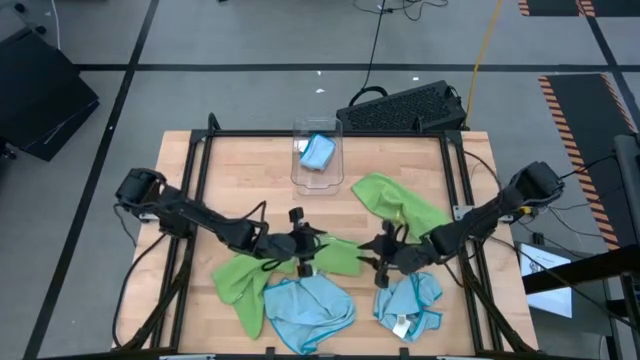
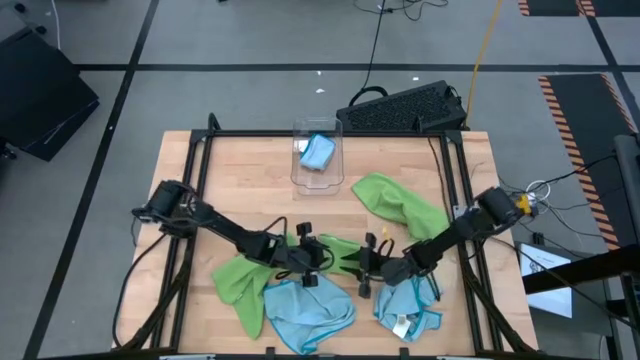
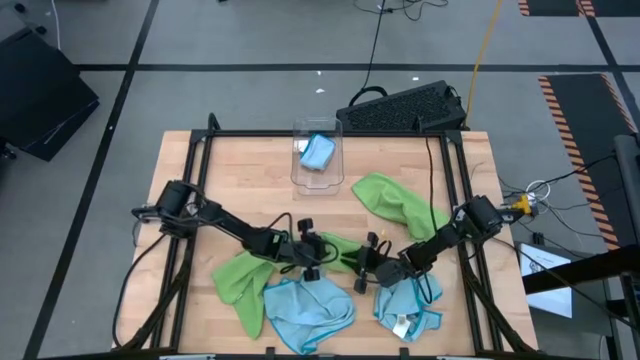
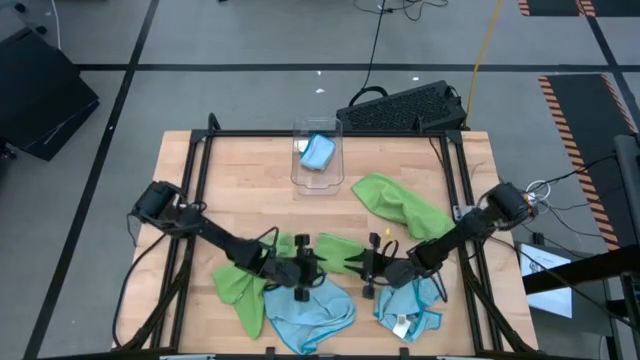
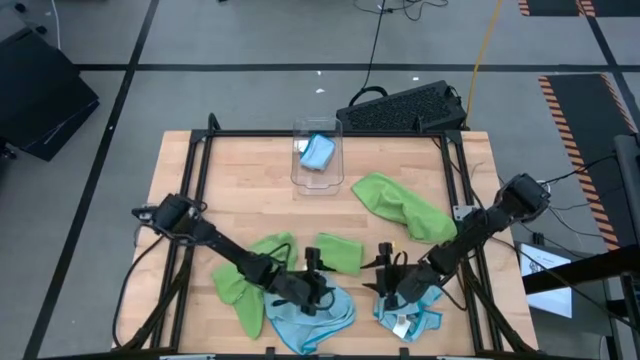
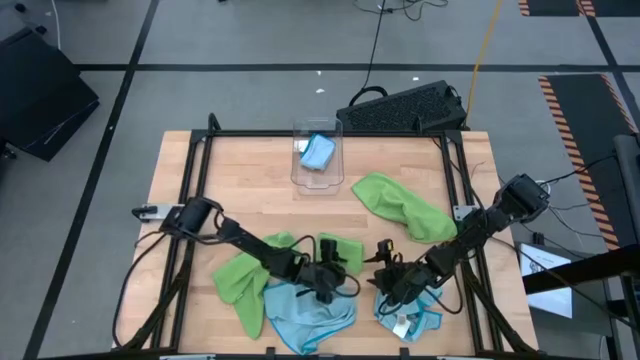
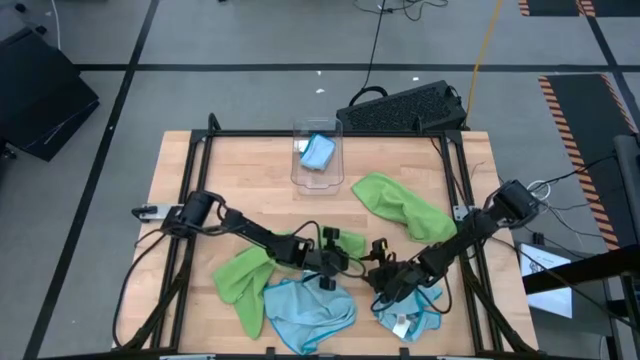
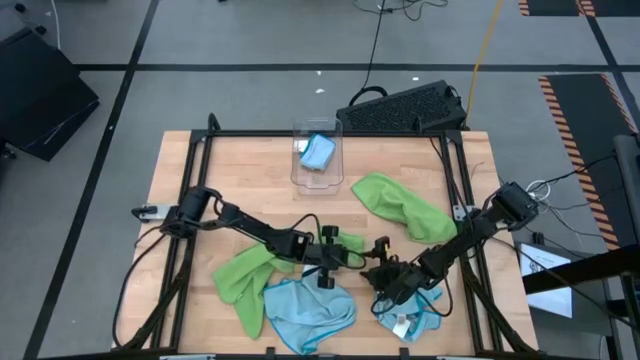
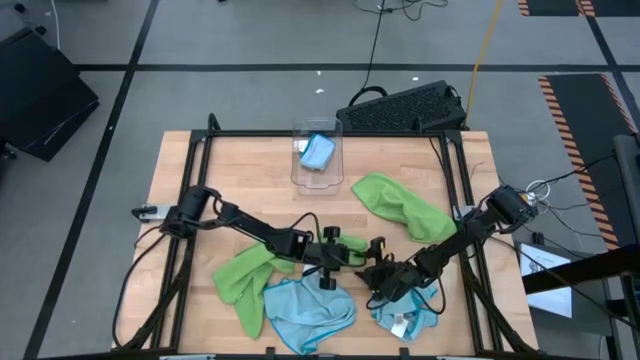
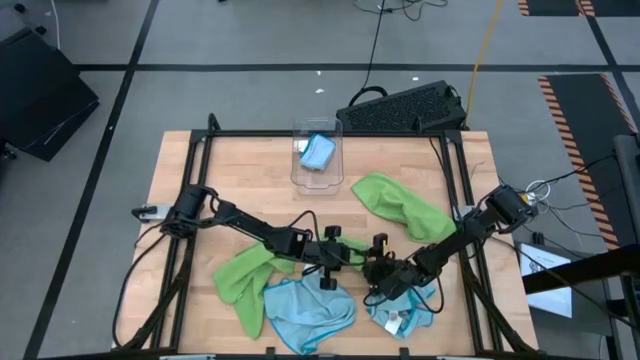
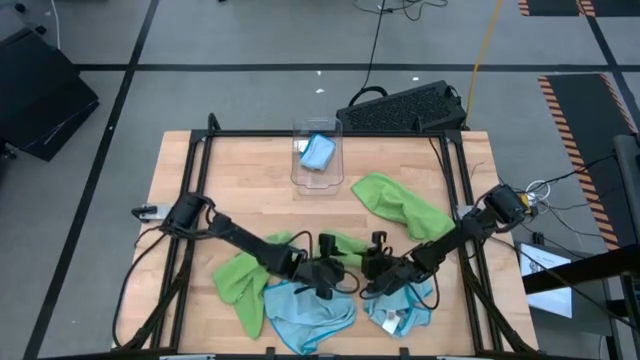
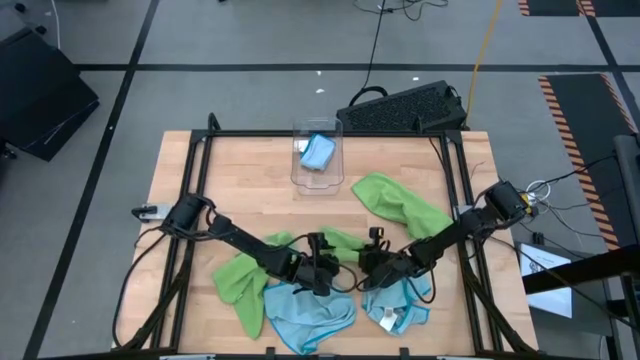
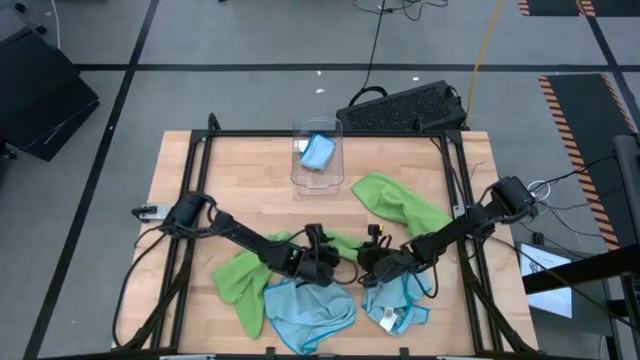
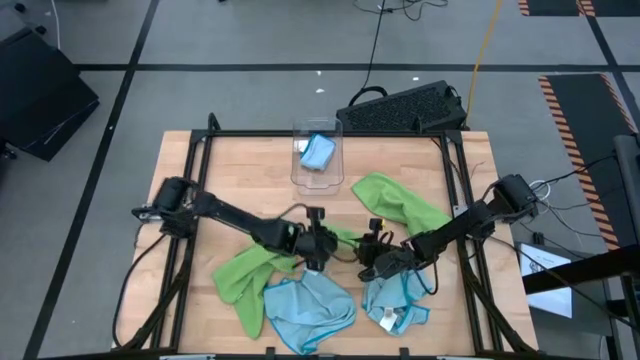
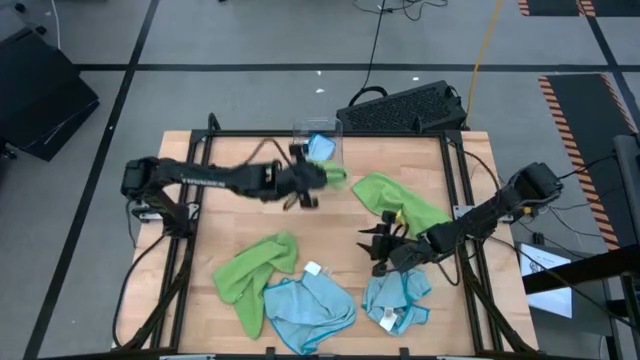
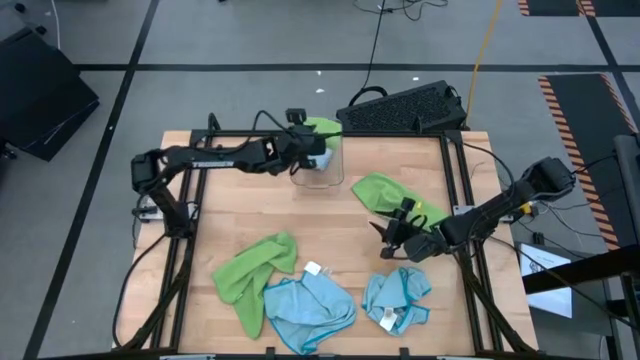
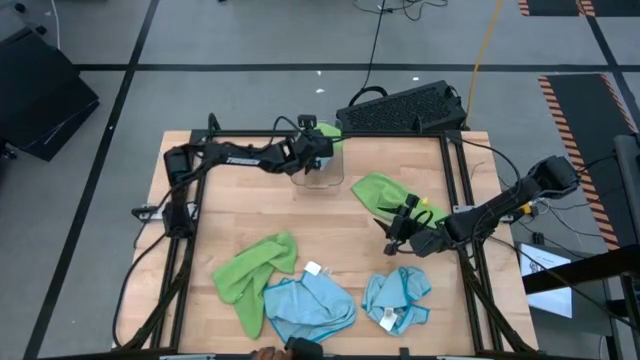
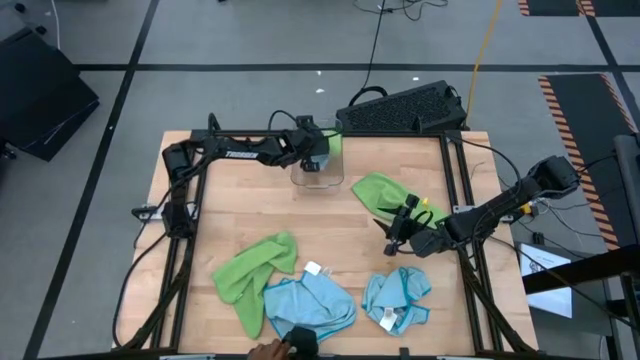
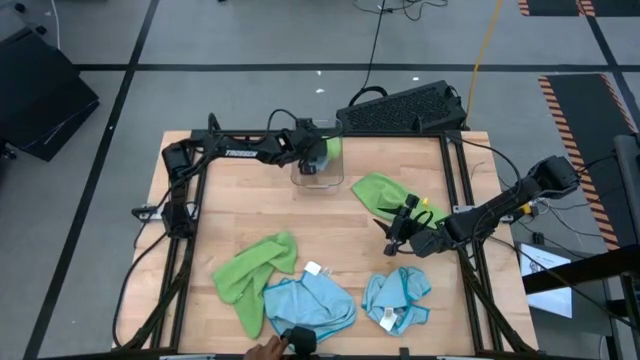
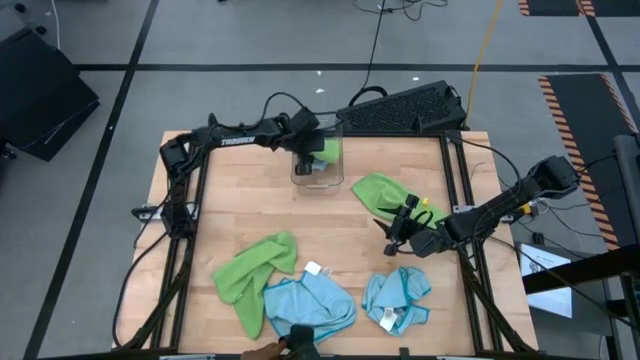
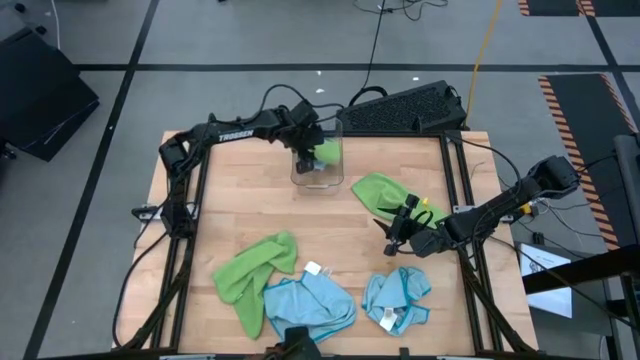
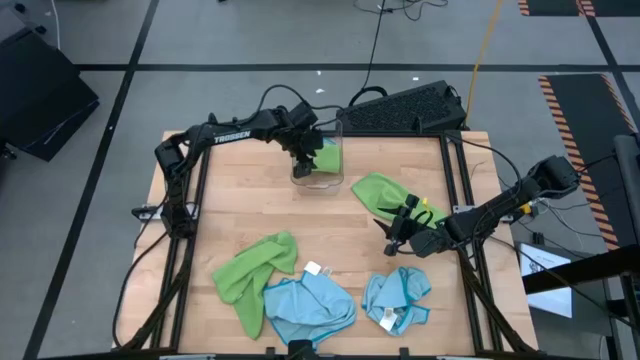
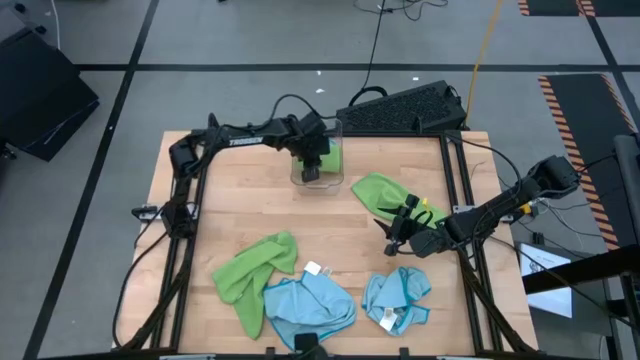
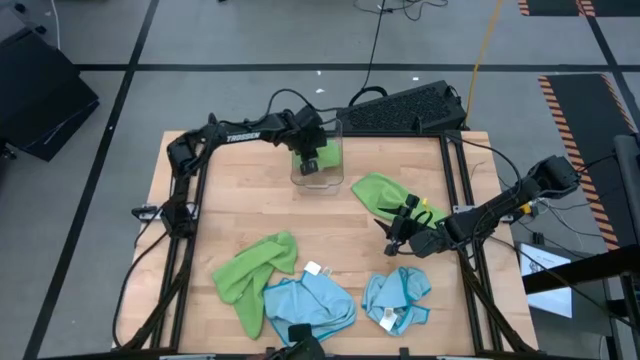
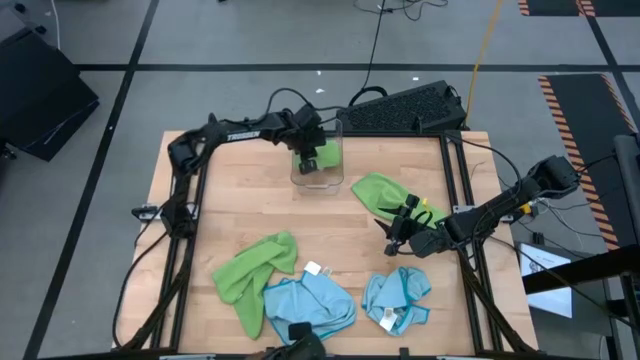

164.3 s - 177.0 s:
Task: Fold microfiber towels
Put the center green towel into the transparent bin

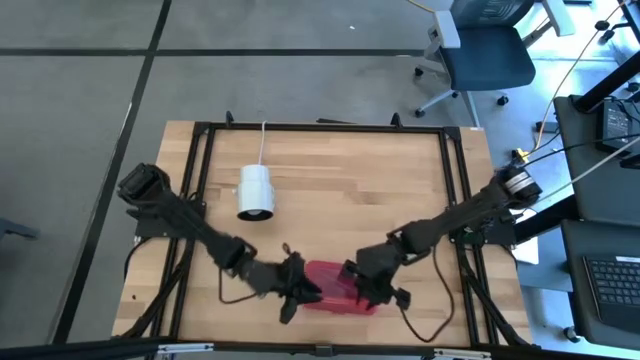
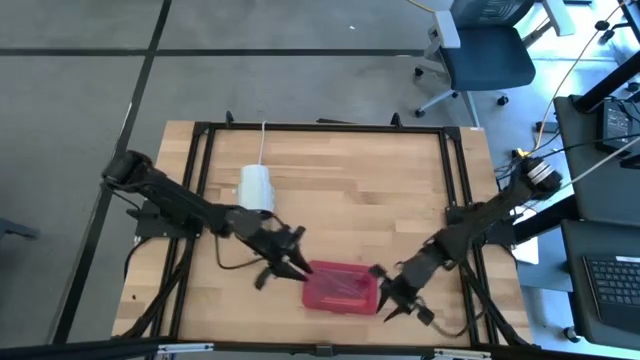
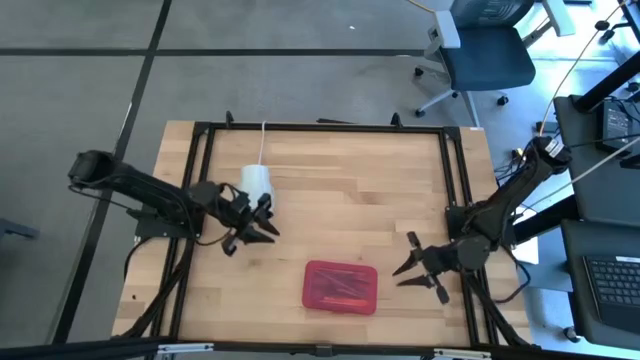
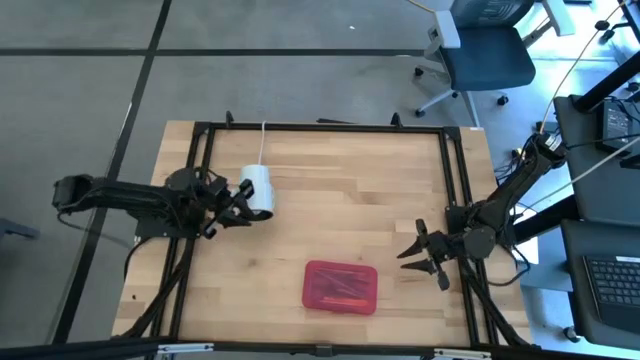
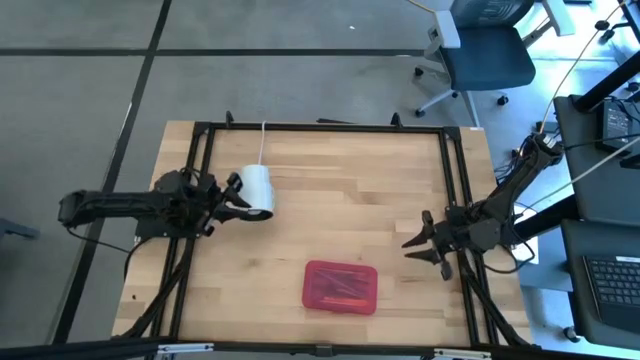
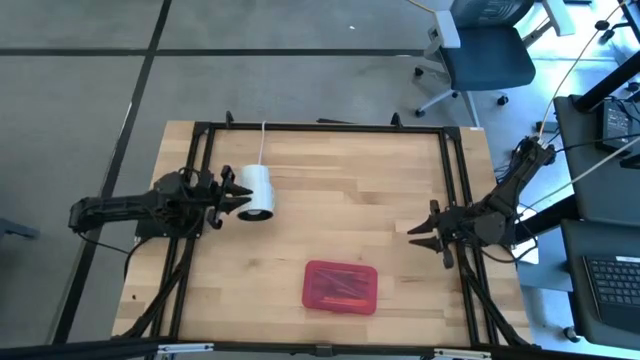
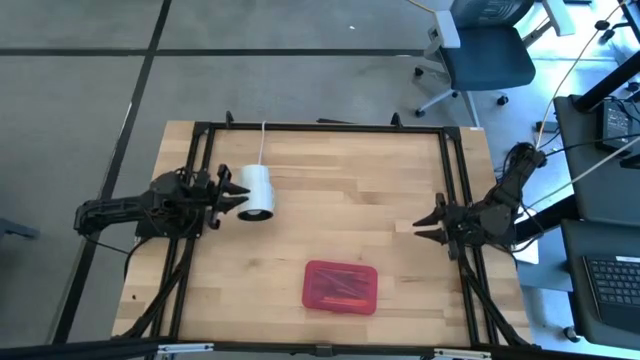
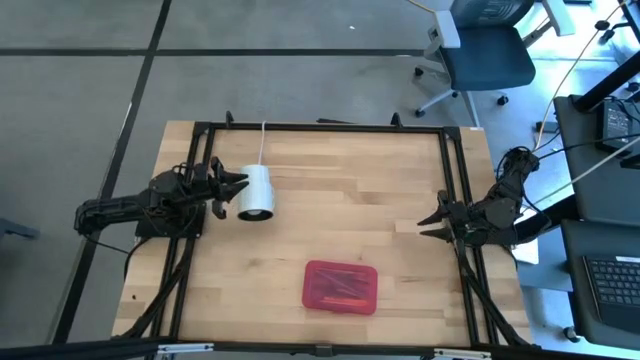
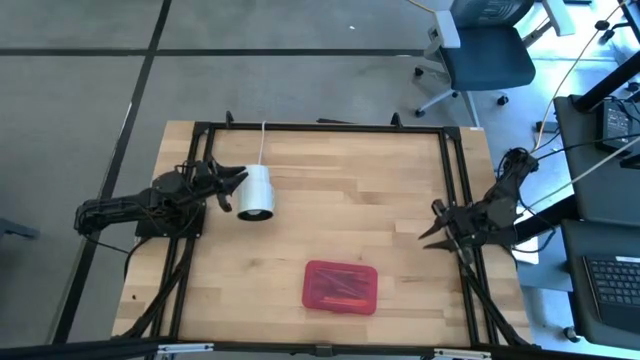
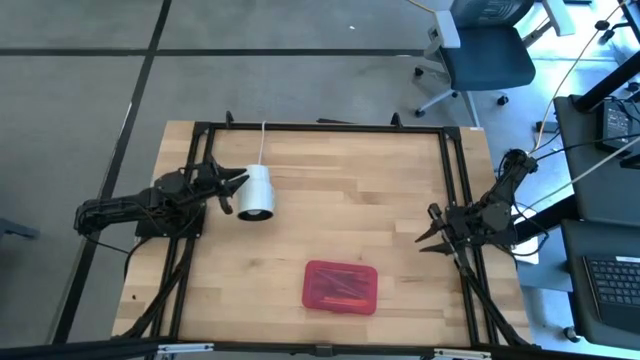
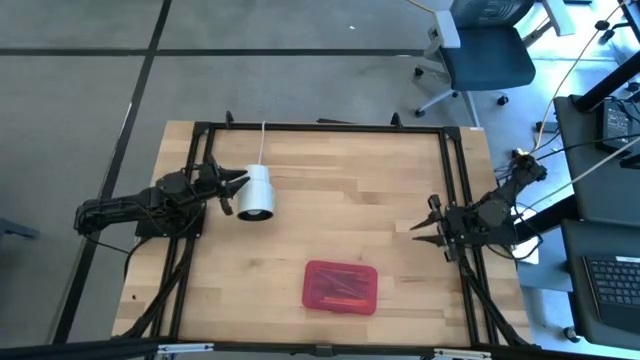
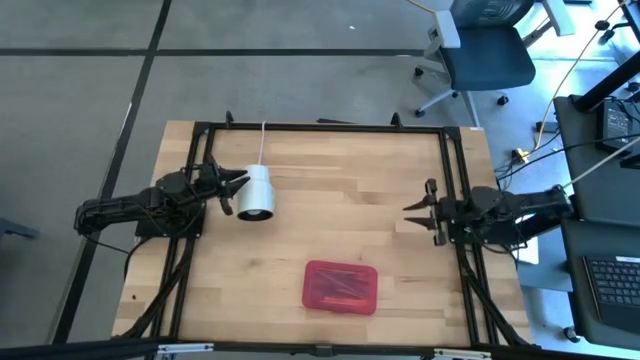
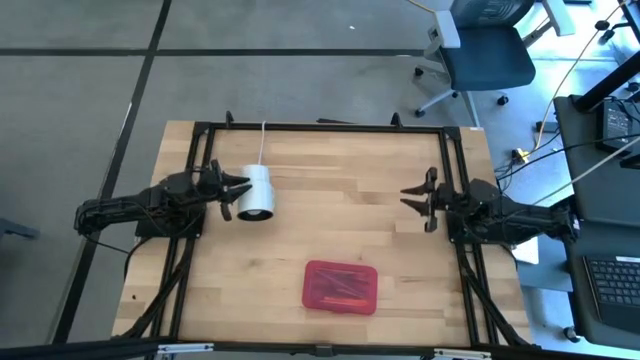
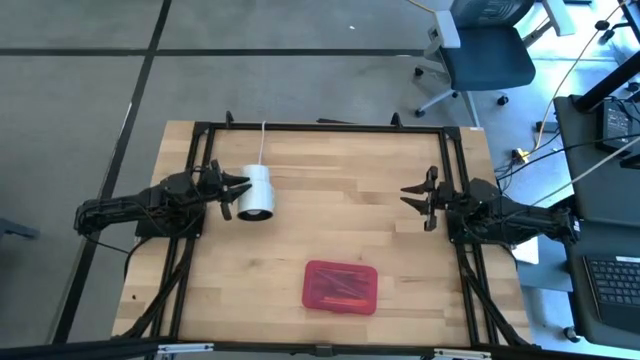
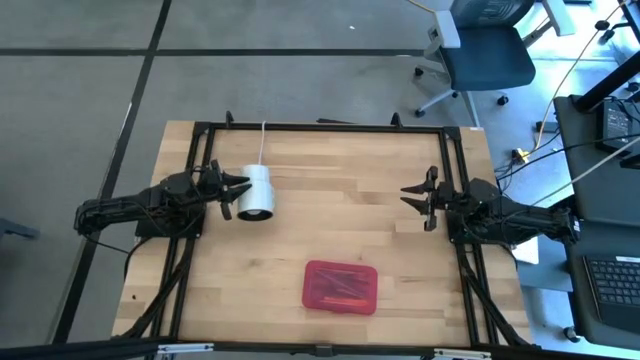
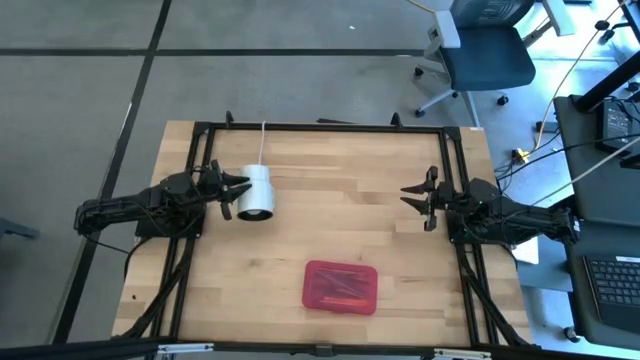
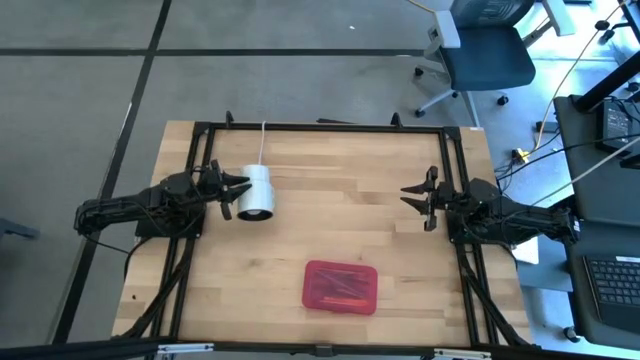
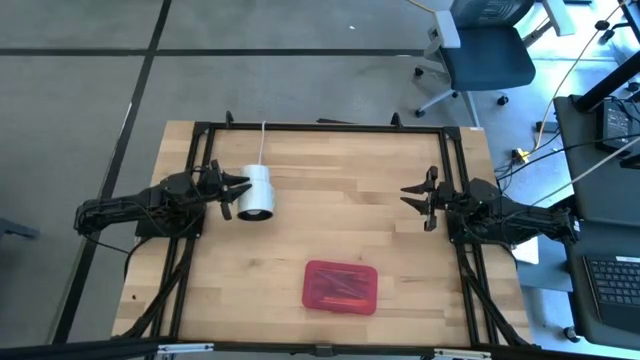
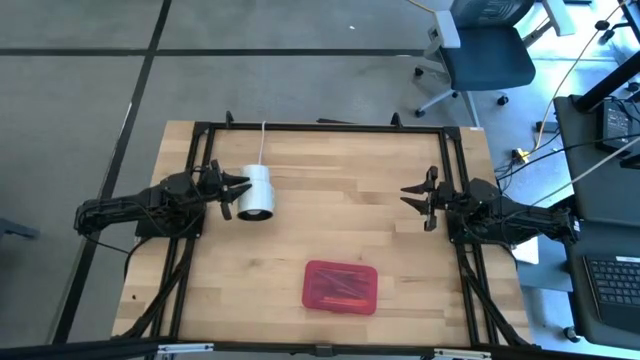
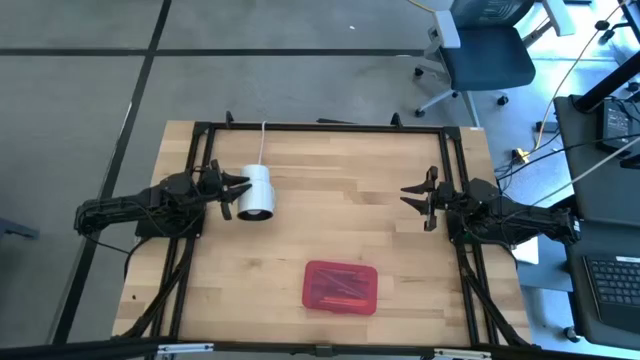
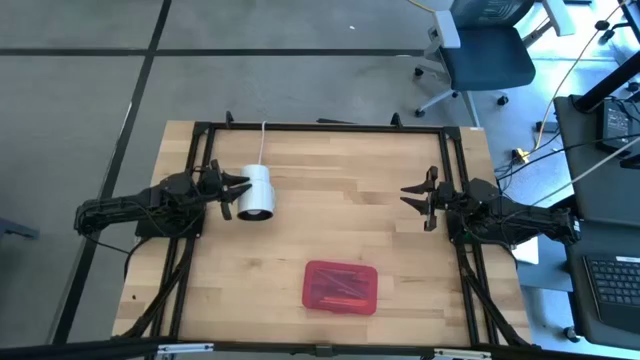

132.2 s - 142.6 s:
Task: Pick & place school supplies into a supply box
Return to Home Position
